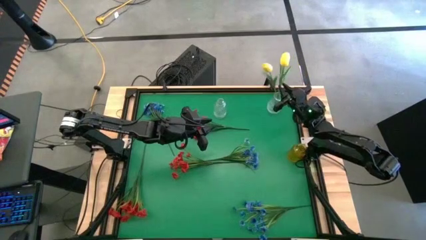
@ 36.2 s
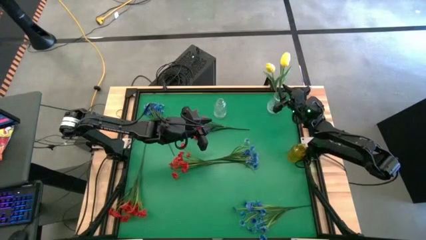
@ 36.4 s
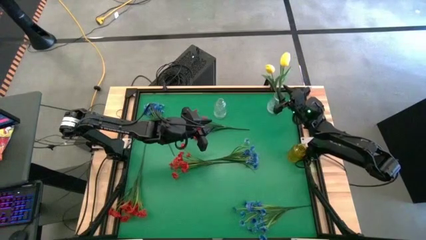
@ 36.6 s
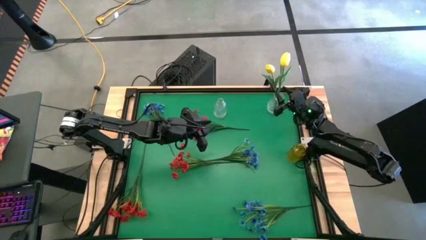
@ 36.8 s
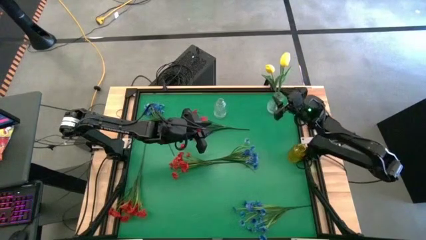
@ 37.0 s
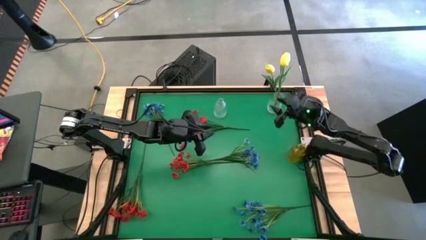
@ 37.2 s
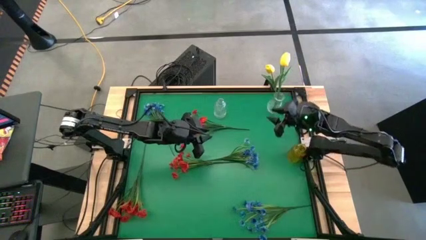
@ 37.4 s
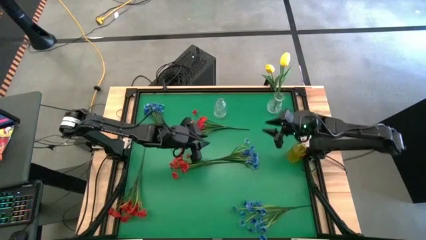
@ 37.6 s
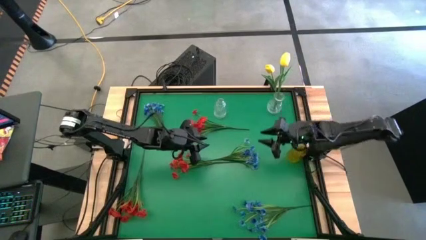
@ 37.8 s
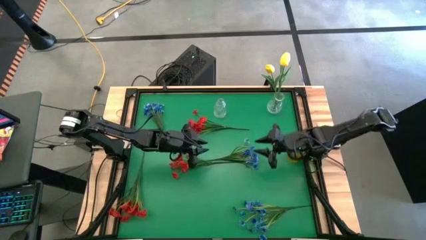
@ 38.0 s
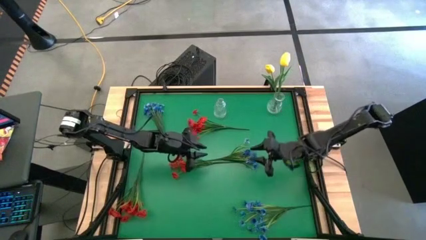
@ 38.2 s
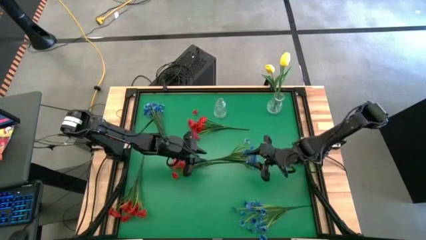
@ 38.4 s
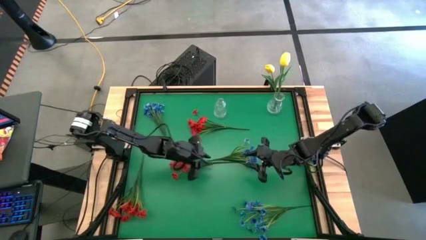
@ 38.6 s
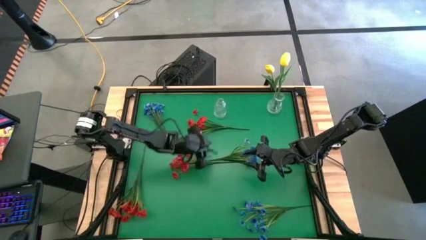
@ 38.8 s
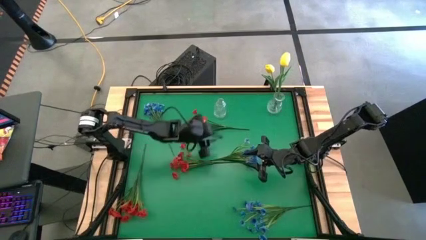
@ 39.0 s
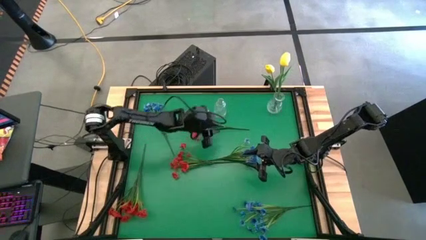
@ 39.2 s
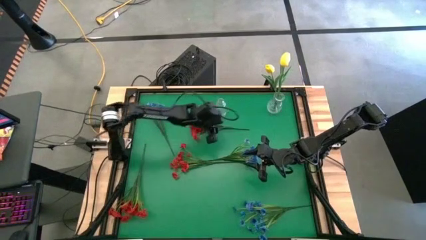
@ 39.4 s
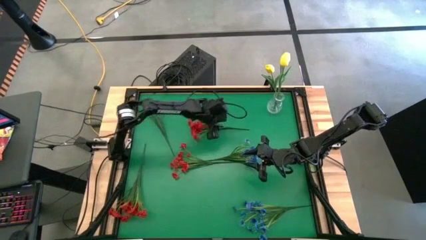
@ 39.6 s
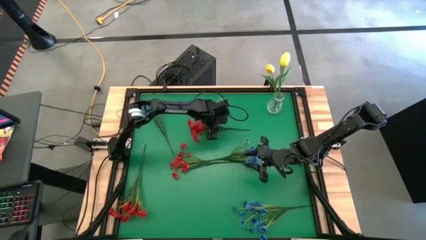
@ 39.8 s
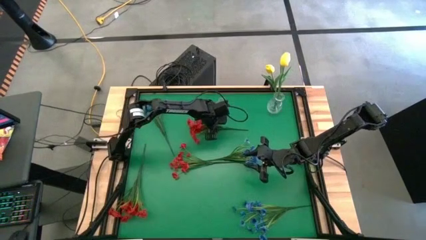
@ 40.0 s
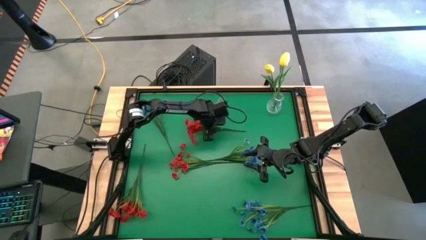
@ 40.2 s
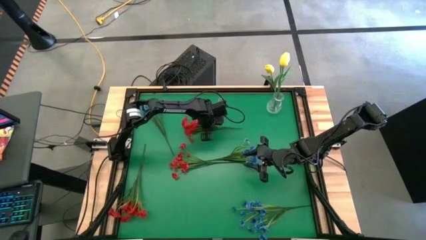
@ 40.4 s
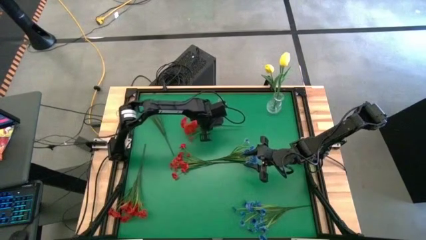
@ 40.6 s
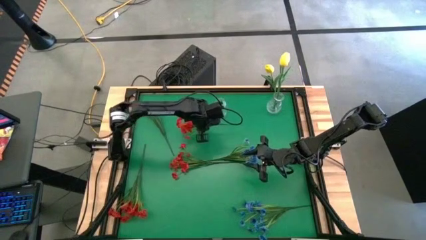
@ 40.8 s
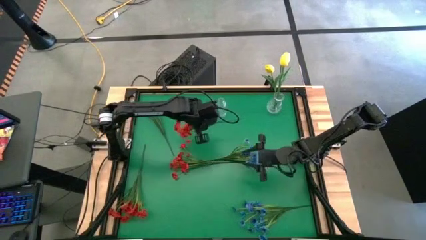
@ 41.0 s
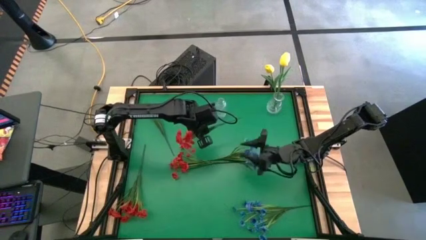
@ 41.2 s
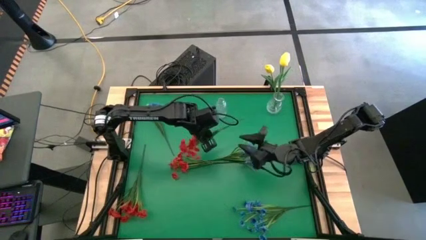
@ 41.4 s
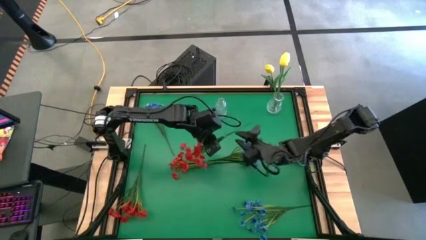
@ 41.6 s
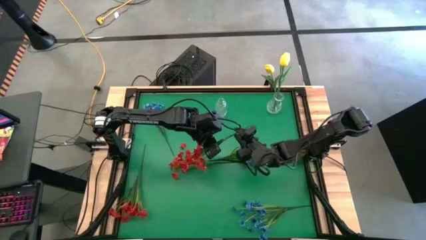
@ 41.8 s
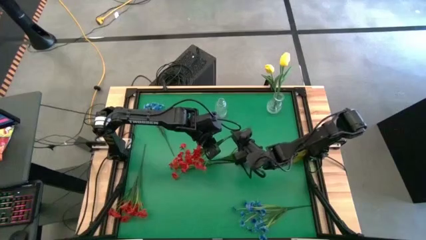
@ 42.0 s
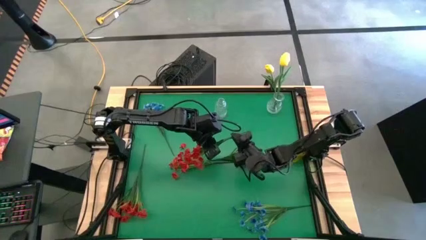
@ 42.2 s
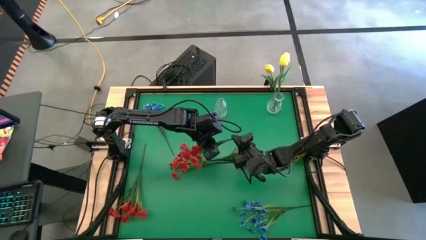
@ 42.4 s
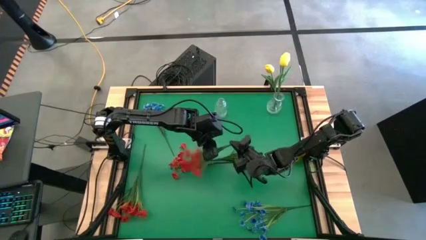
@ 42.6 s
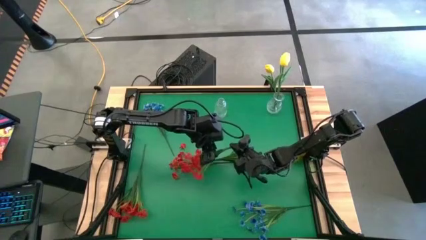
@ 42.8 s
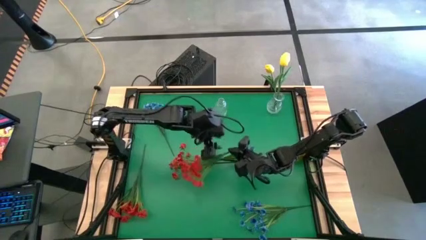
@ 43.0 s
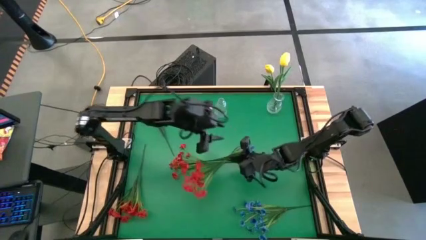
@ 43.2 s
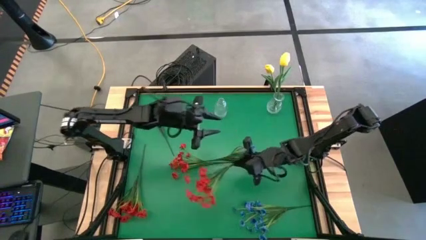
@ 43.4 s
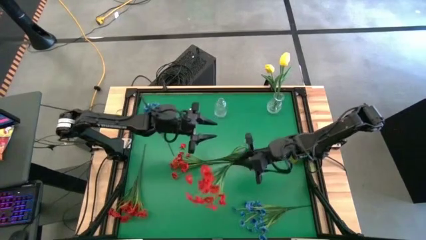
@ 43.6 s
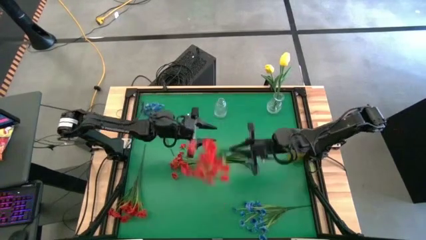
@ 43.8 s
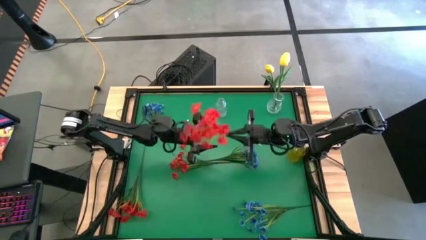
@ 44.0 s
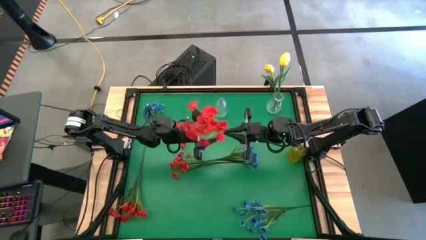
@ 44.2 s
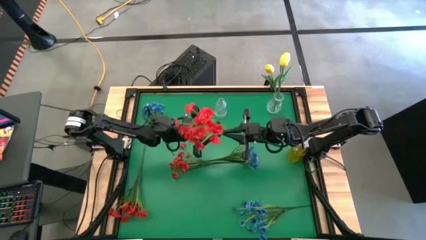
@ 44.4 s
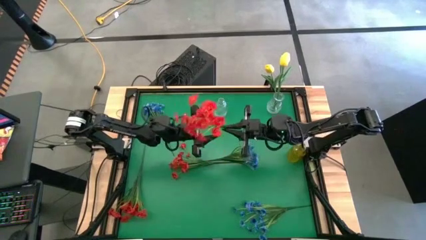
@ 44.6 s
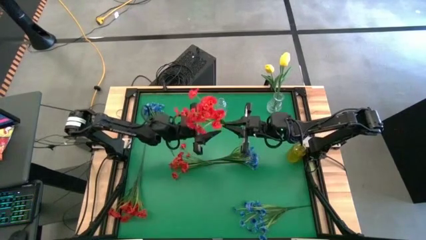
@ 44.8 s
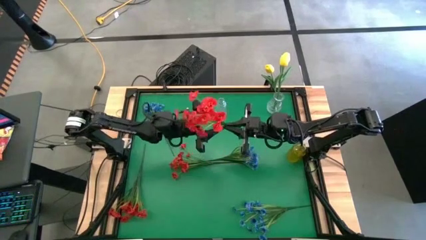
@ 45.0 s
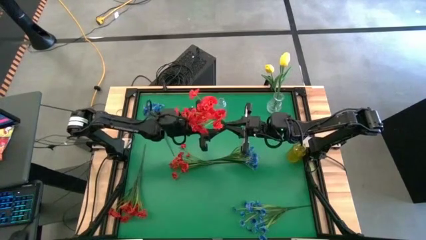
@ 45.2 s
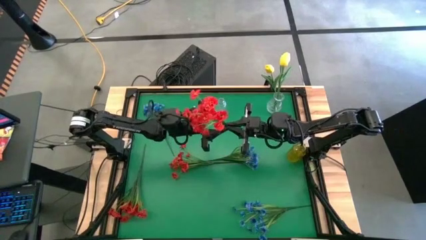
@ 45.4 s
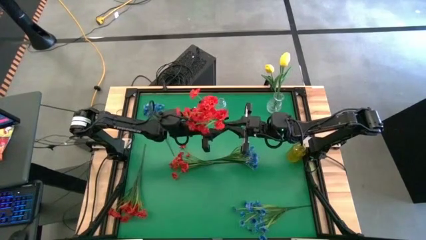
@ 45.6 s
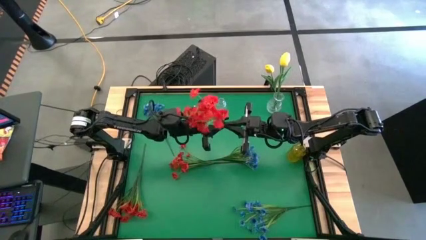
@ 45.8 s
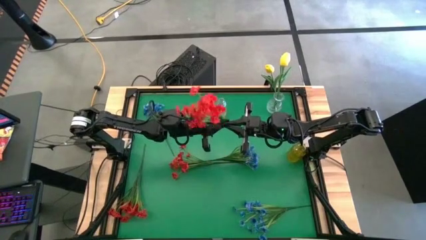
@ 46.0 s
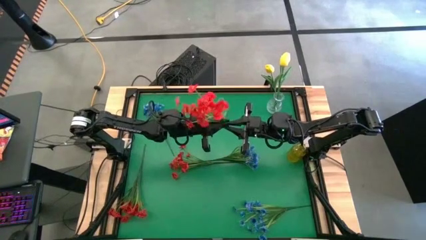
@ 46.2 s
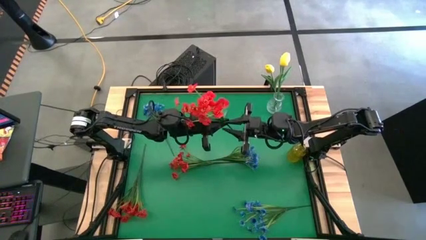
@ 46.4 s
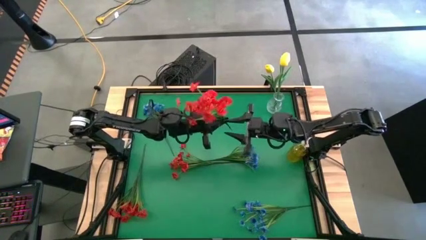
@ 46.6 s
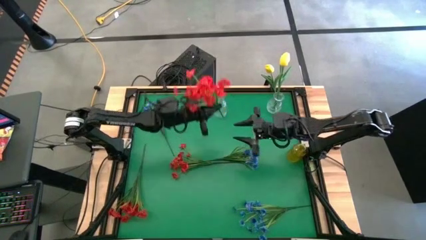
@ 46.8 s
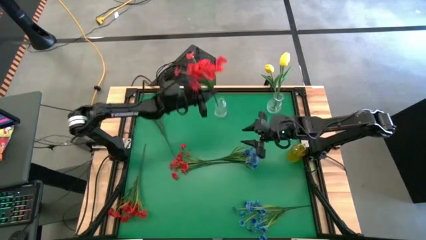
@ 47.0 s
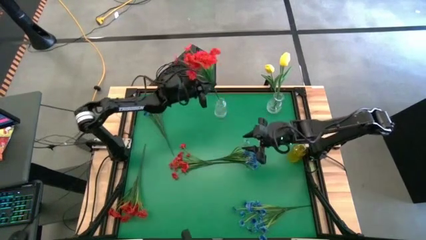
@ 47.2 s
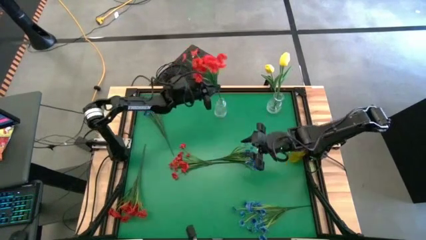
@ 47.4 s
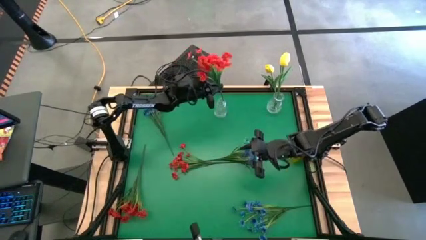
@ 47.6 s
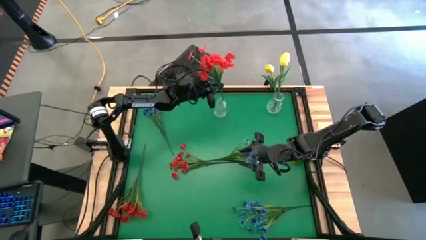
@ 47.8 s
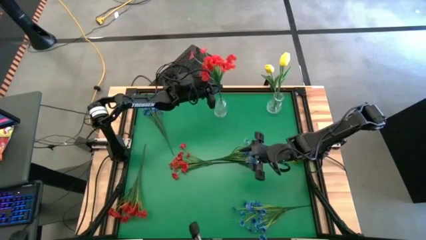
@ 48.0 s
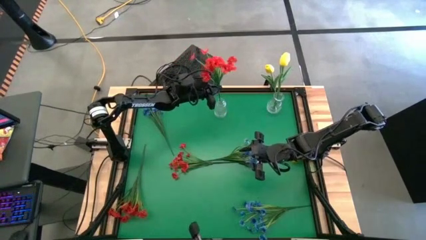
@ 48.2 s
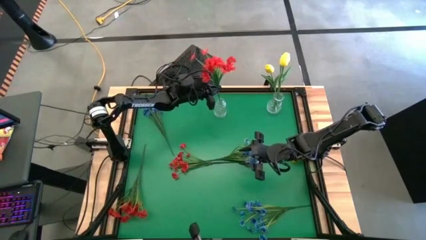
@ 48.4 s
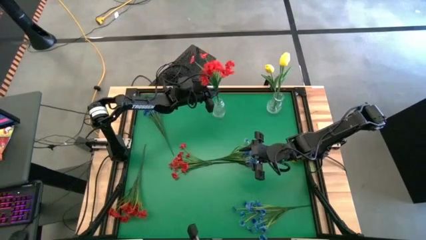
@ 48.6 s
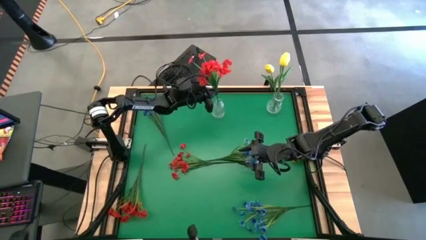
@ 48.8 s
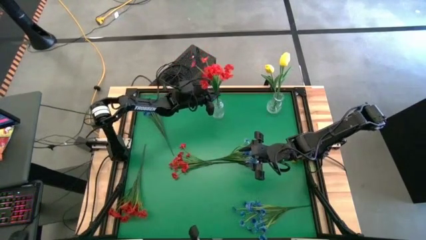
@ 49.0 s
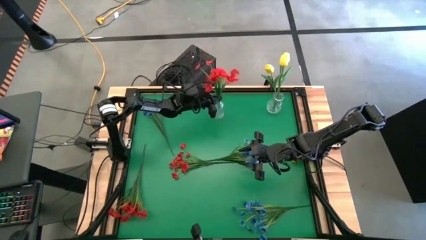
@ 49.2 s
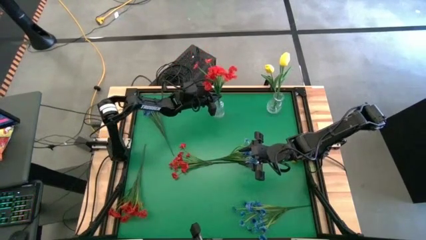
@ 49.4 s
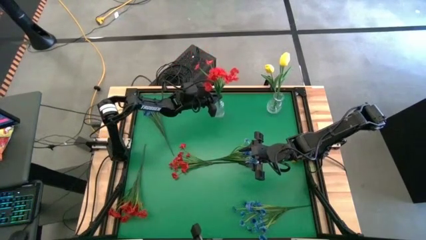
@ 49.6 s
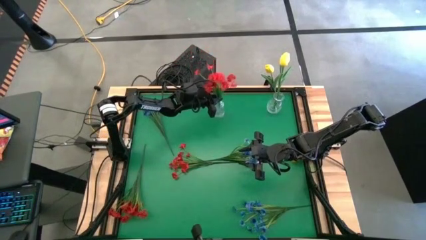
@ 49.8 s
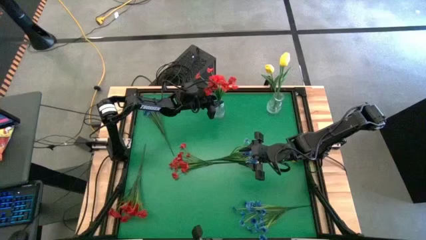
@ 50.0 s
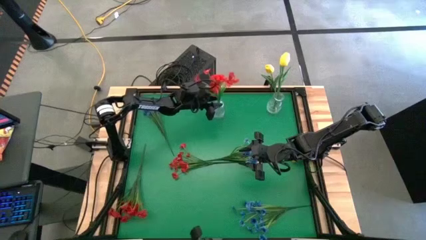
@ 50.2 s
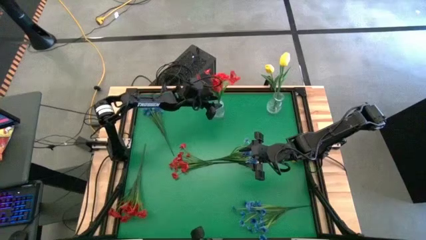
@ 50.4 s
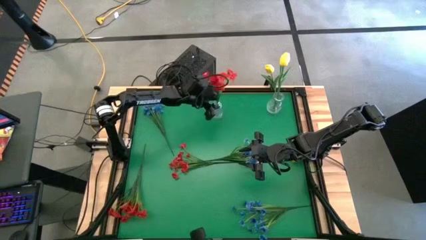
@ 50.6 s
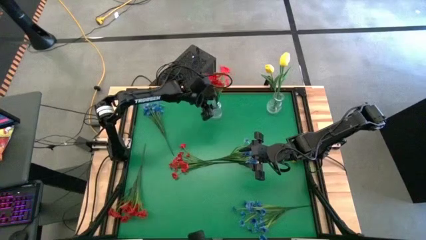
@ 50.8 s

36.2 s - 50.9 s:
Task: Sort flowers into vase by color
Put the top red flowers into the left white transparent vase
